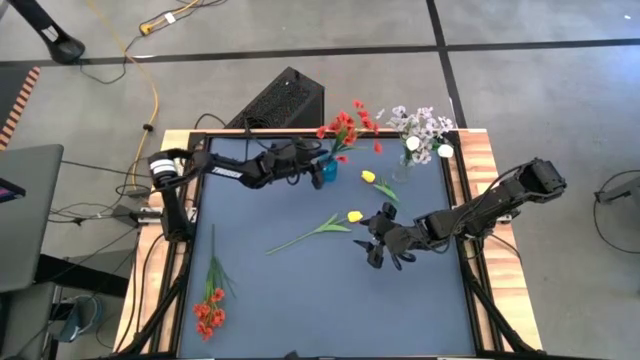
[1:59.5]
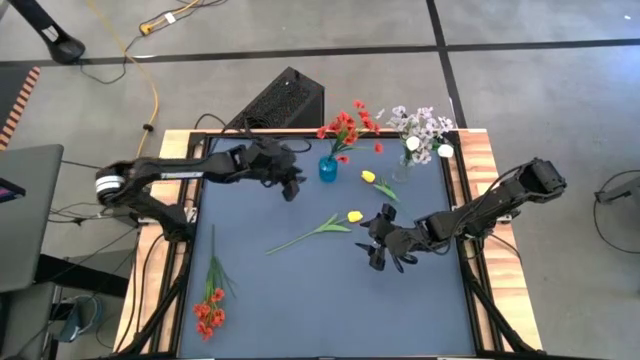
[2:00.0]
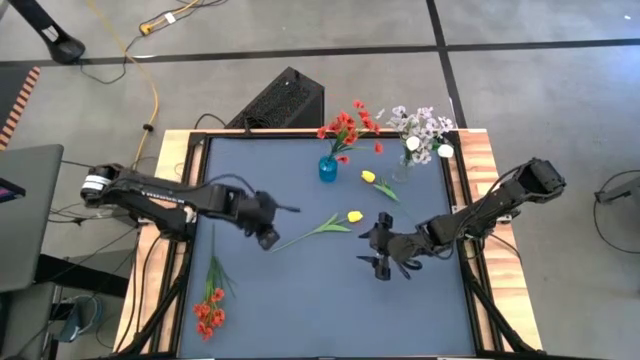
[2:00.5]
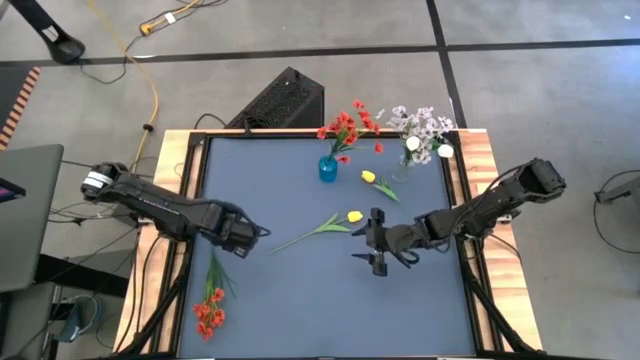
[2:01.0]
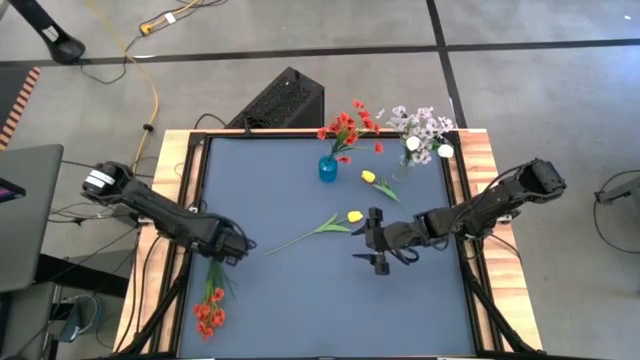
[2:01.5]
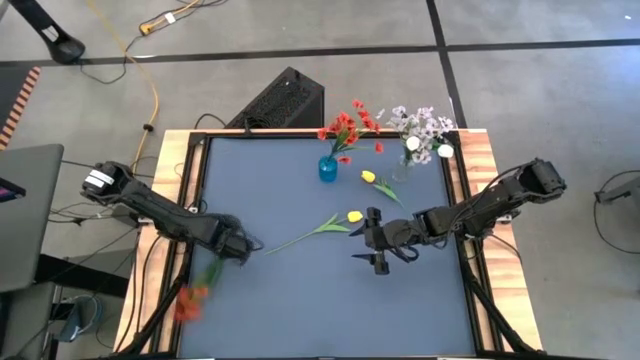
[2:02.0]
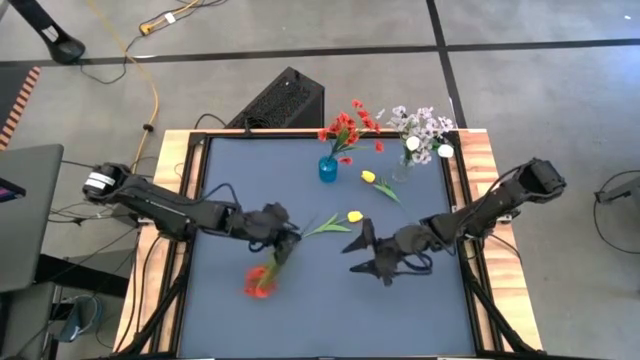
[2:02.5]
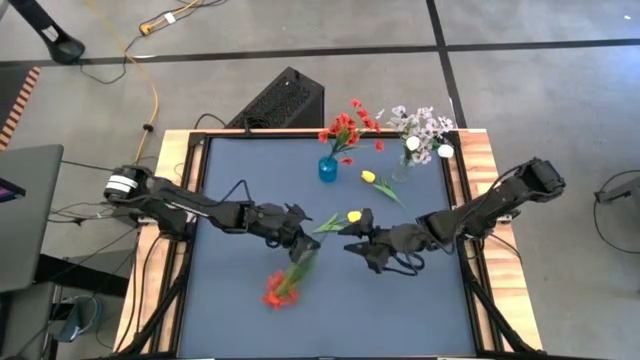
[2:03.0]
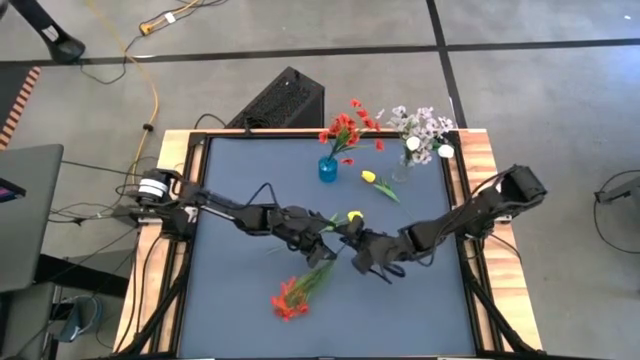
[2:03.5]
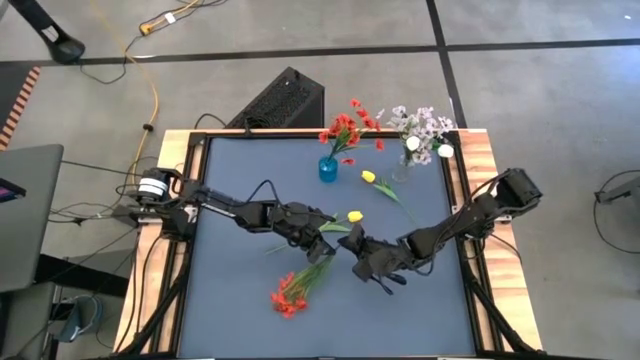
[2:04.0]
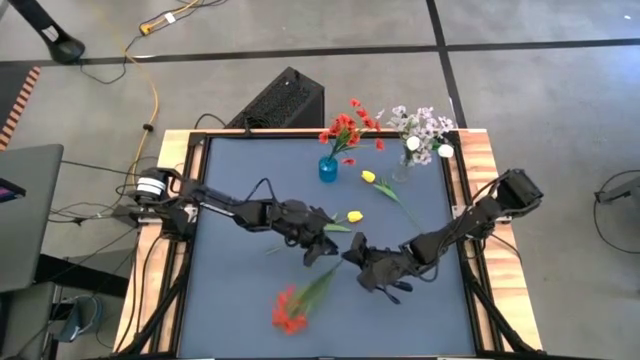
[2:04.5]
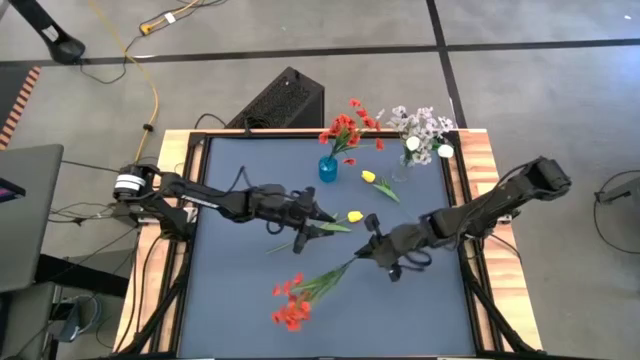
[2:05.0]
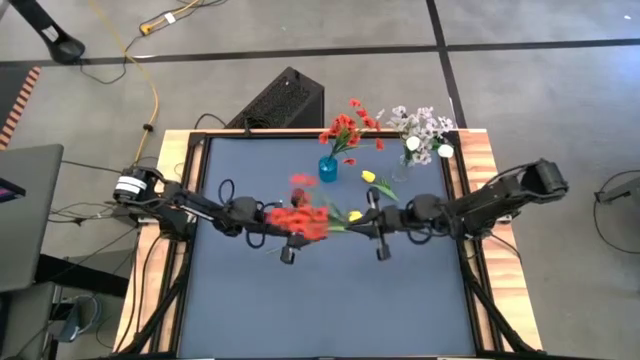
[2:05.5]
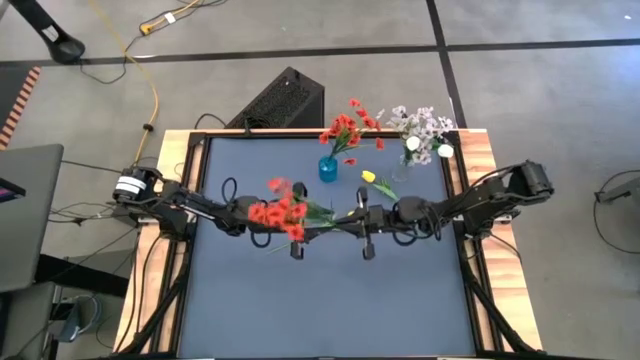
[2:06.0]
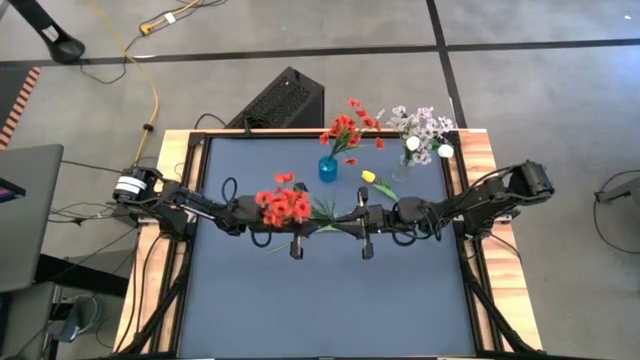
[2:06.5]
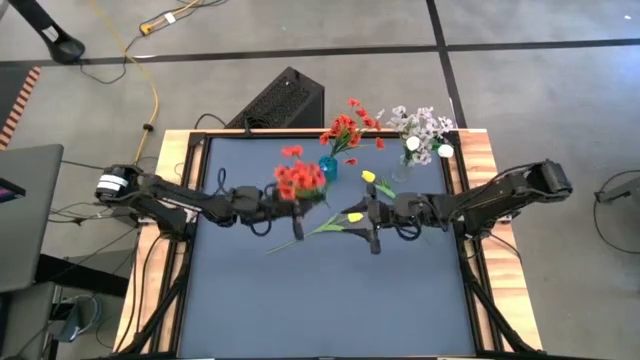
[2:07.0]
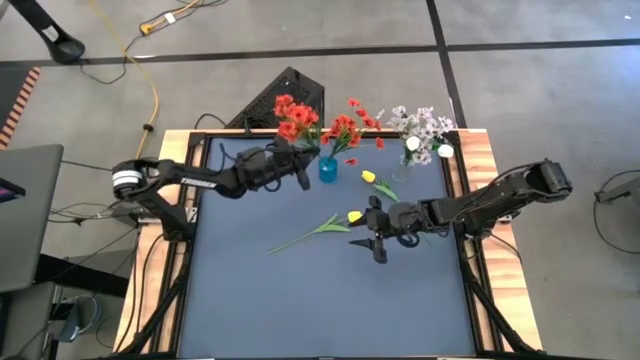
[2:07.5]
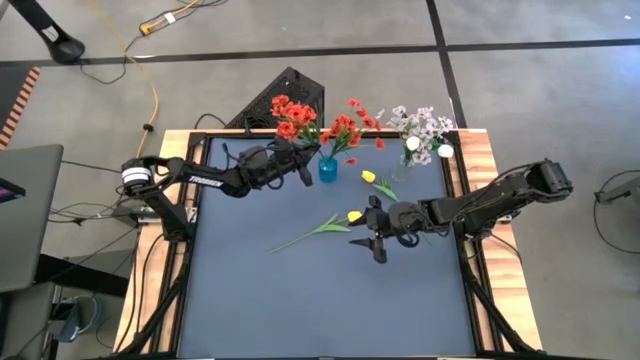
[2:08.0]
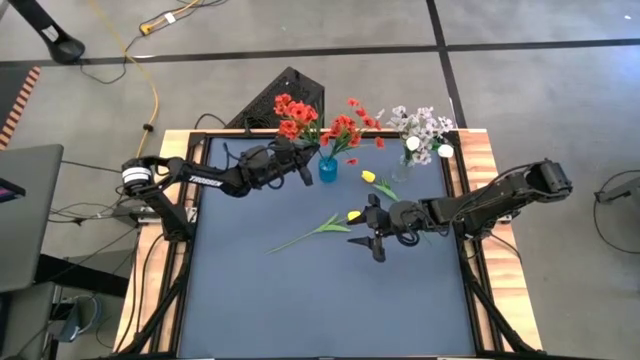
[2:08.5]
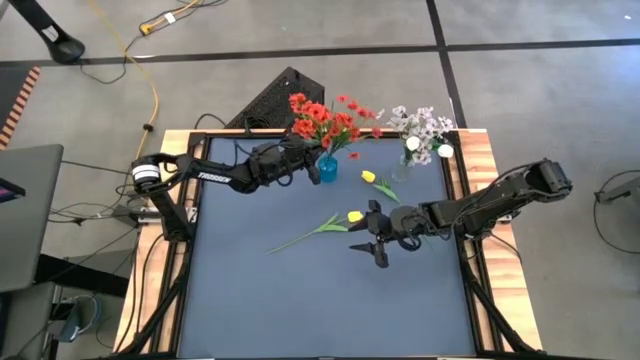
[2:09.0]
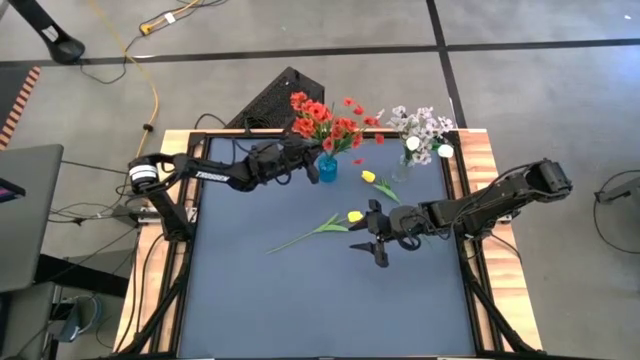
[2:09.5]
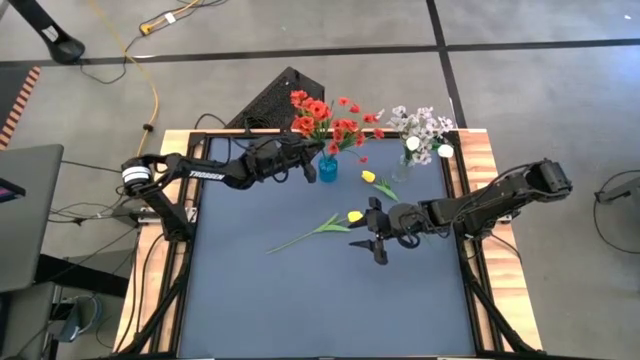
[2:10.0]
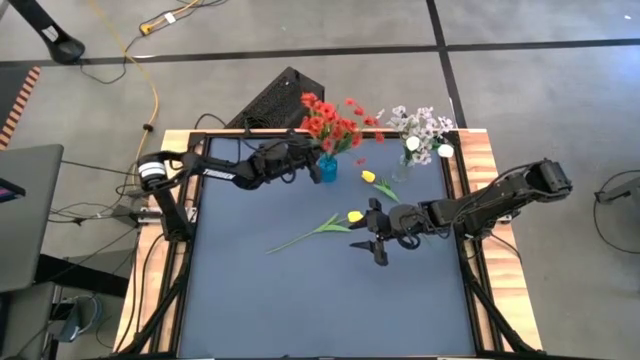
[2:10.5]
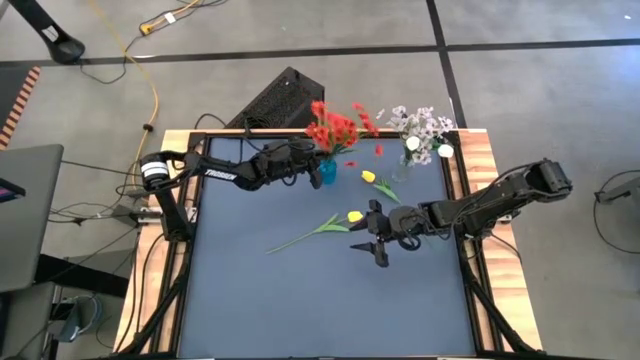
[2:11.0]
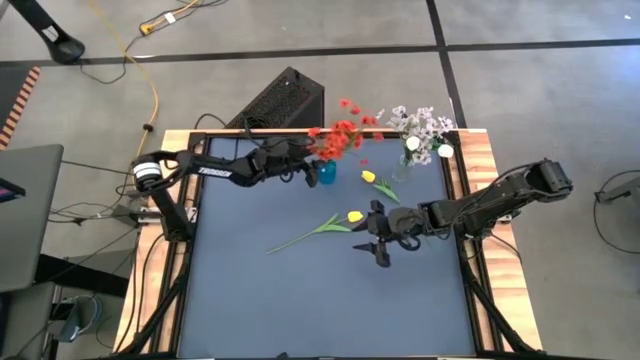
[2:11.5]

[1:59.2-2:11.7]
Task: Sort flowers into vase by color
Put the orange flowers into the blue vase

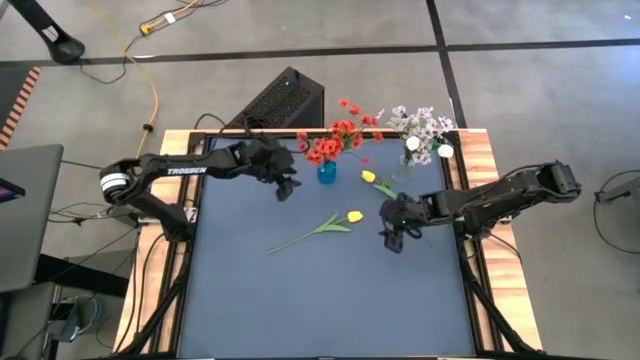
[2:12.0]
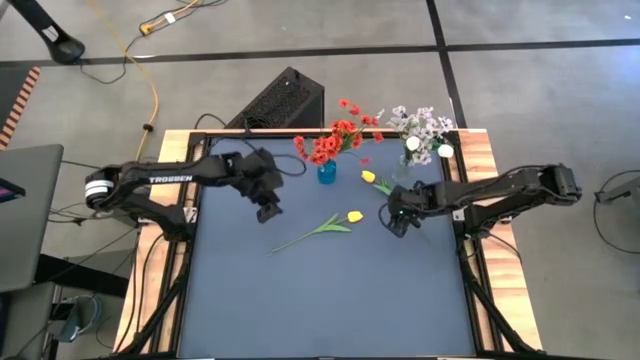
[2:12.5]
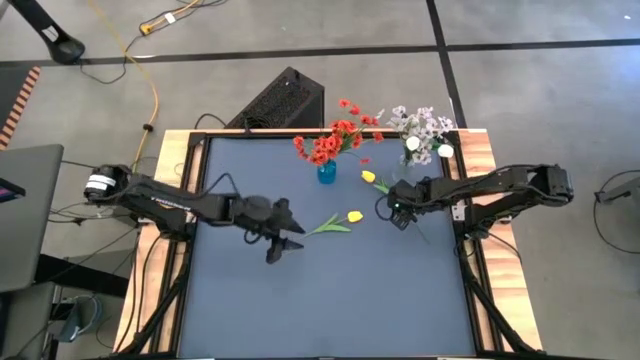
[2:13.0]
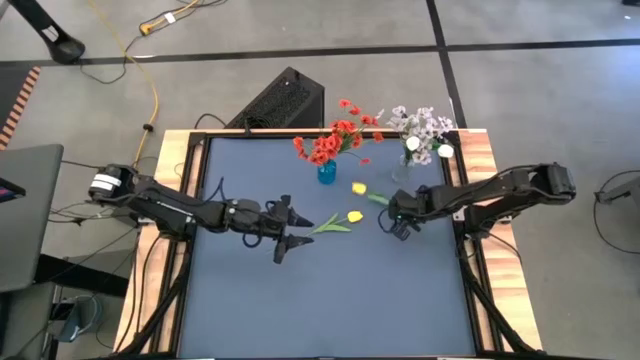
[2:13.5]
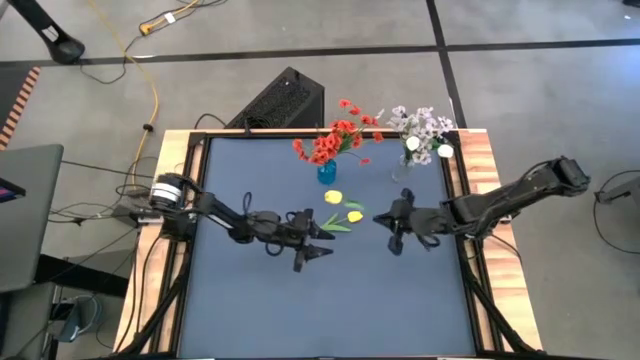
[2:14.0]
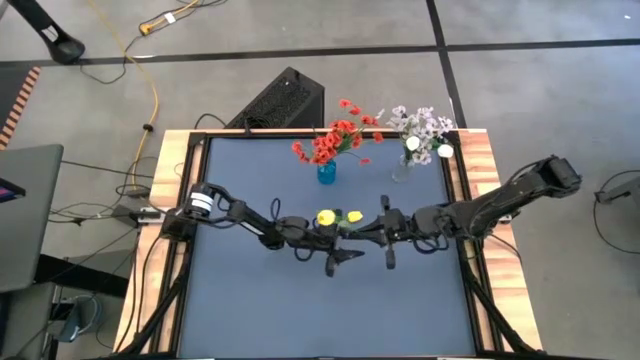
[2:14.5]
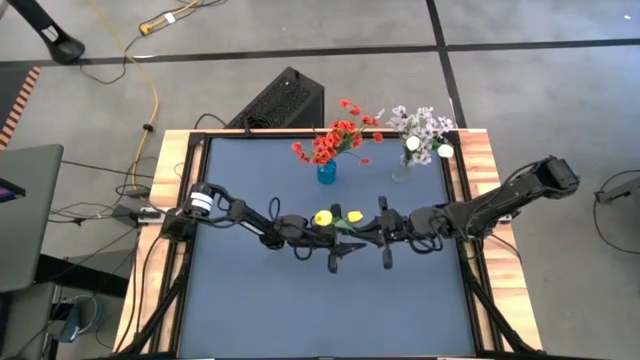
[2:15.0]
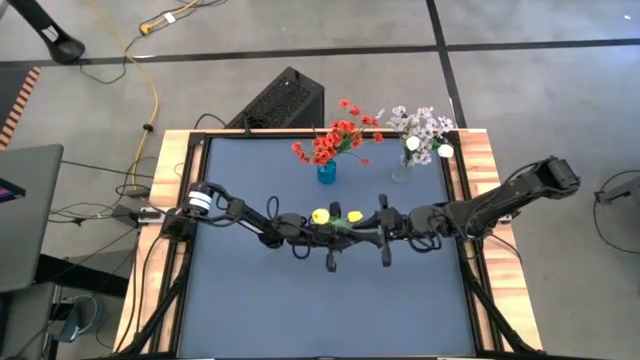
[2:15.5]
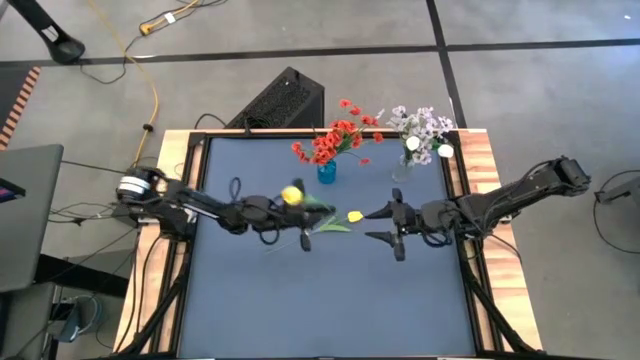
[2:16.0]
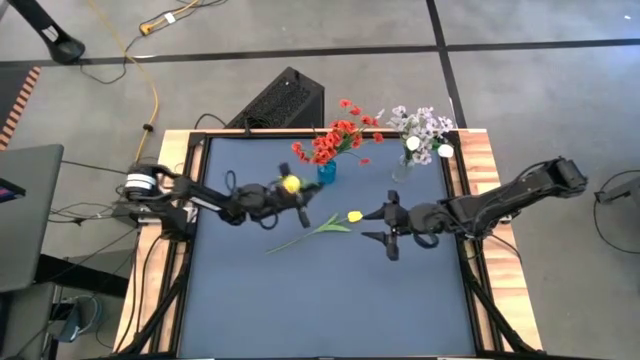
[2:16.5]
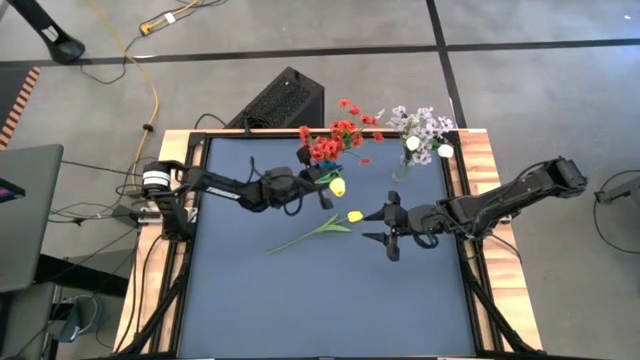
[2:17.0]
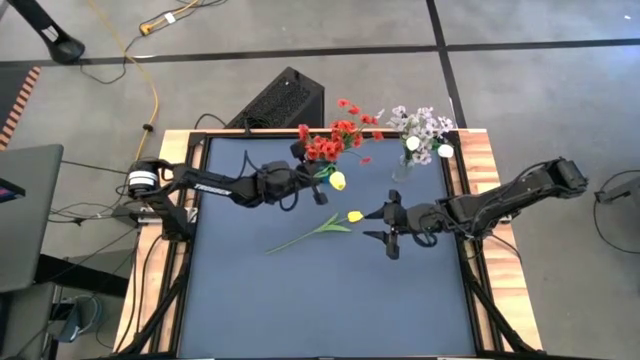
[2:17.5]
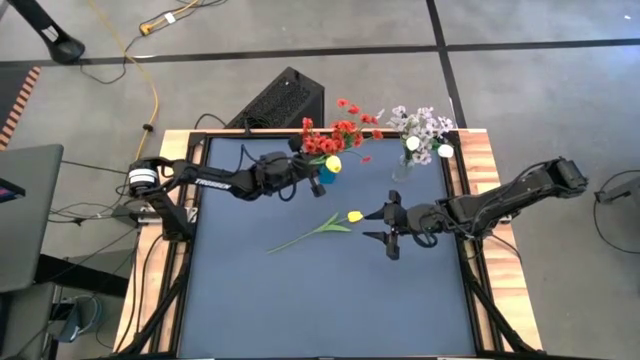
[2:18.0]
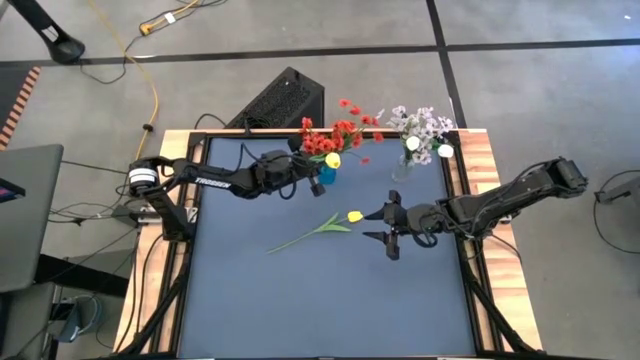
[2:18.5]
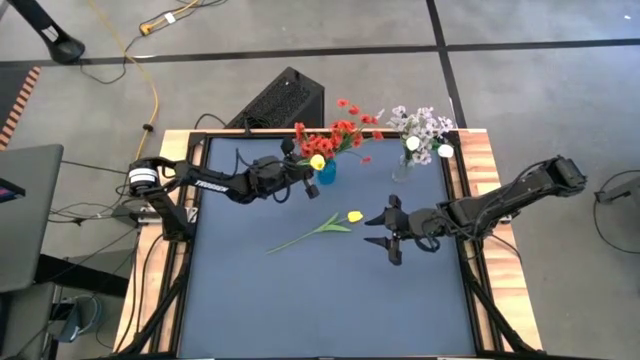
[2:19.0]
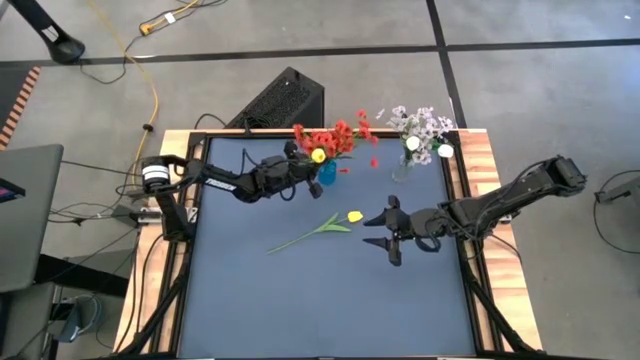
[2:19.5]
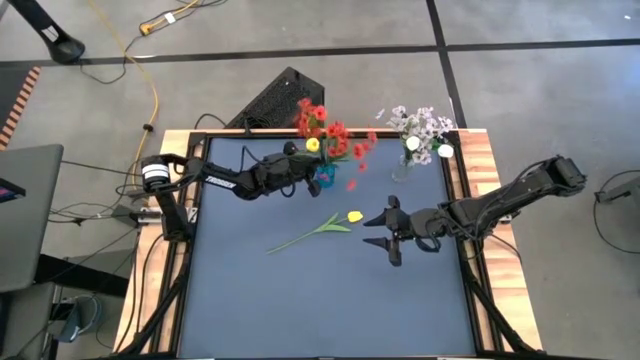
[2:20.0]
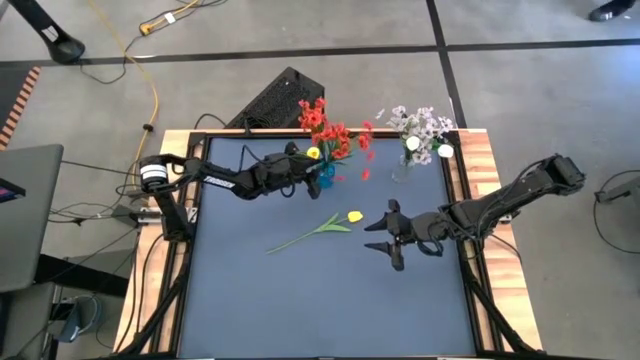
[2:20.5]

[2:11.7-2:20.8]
Put the top yellow flower into the blue vase
